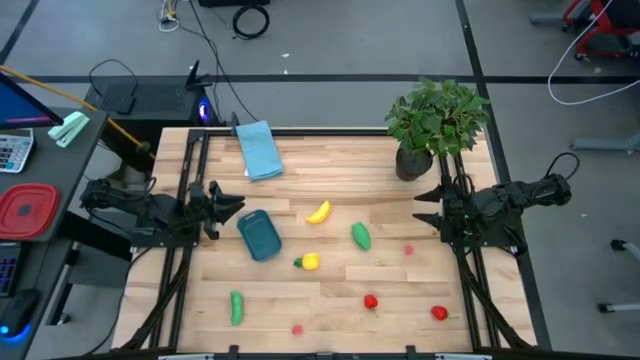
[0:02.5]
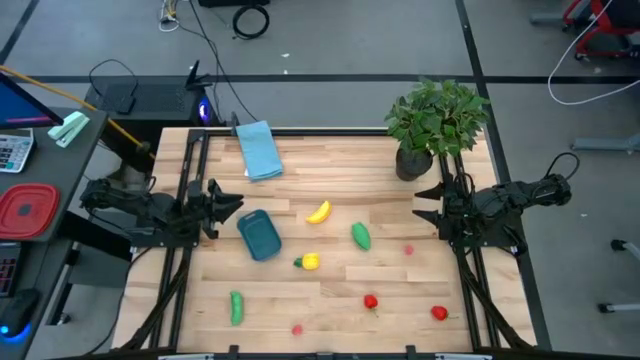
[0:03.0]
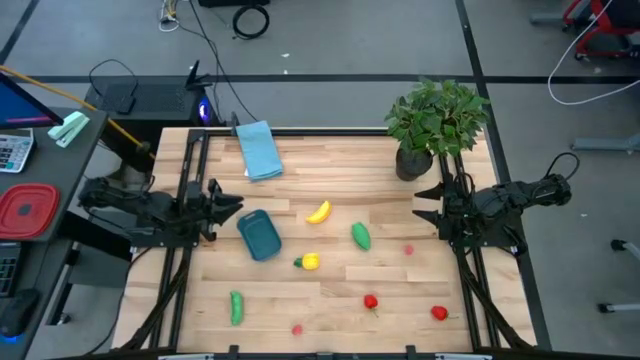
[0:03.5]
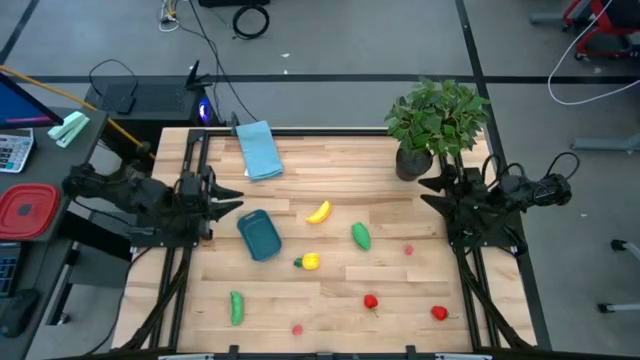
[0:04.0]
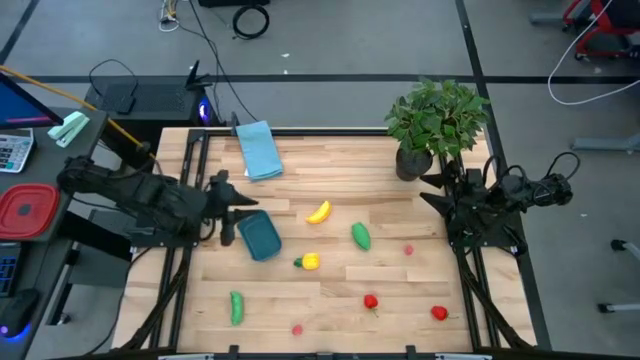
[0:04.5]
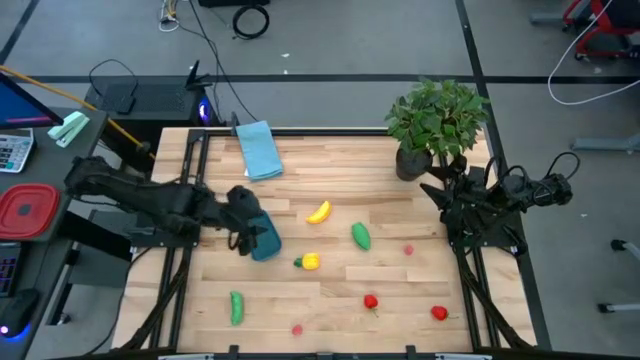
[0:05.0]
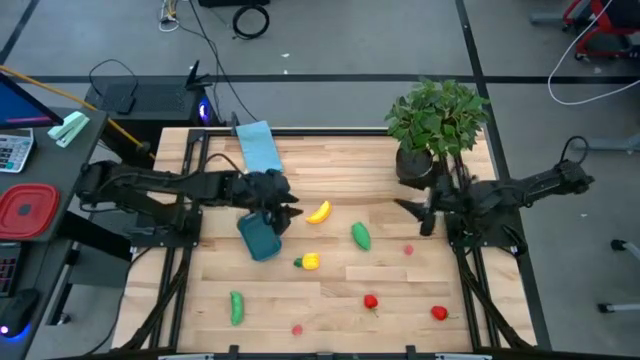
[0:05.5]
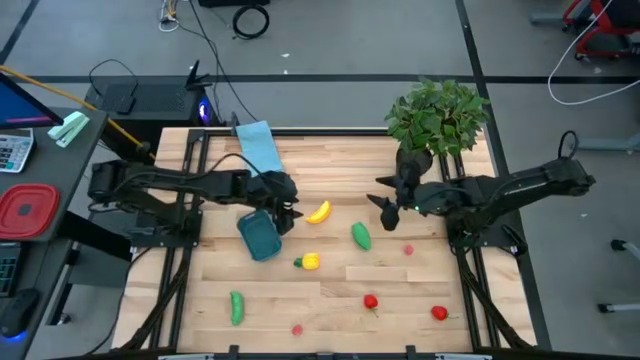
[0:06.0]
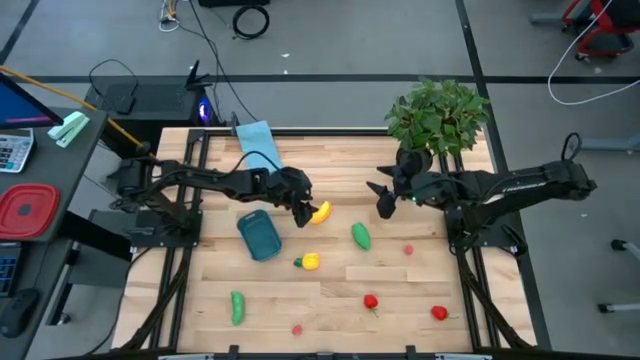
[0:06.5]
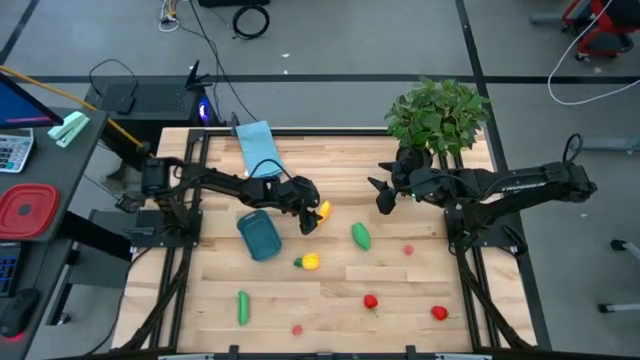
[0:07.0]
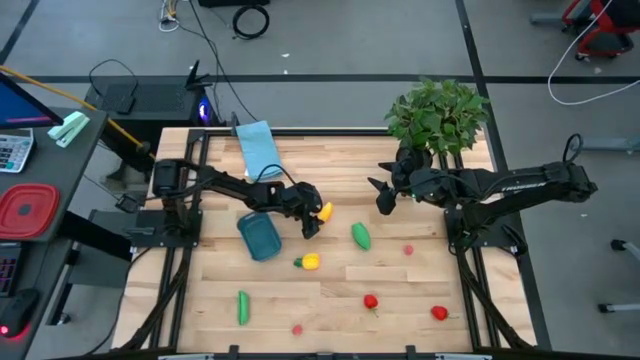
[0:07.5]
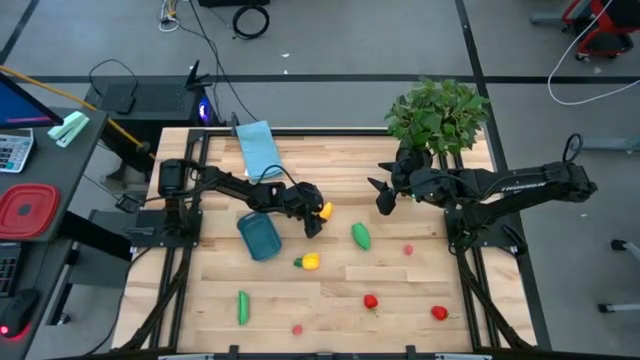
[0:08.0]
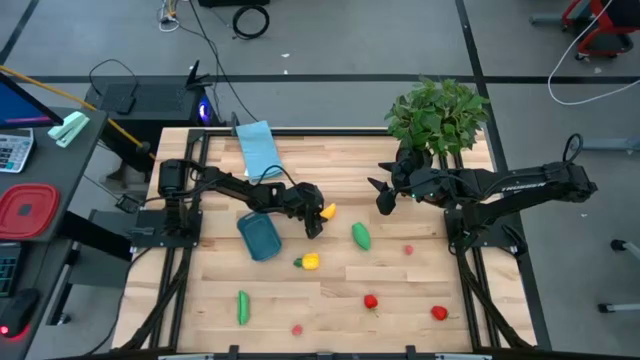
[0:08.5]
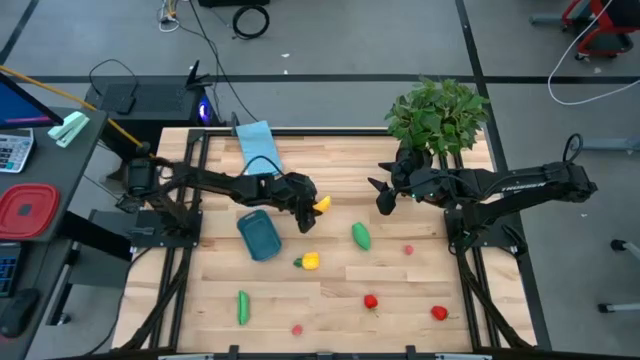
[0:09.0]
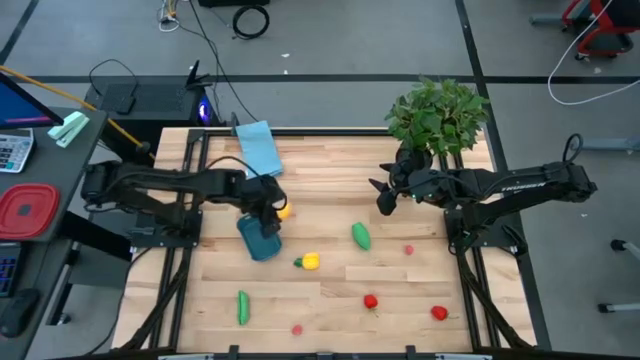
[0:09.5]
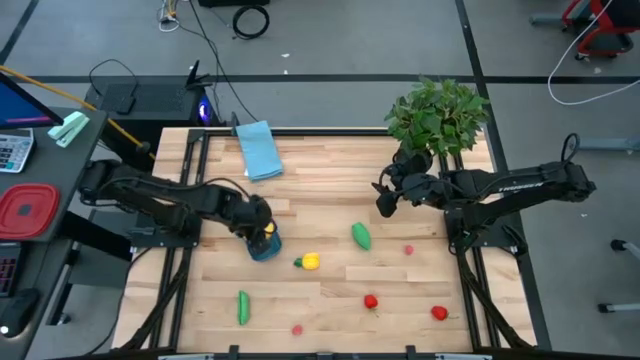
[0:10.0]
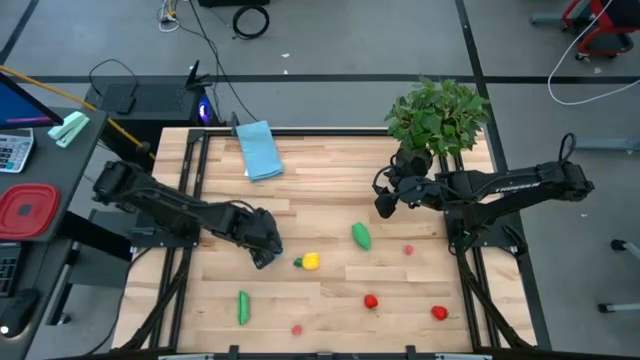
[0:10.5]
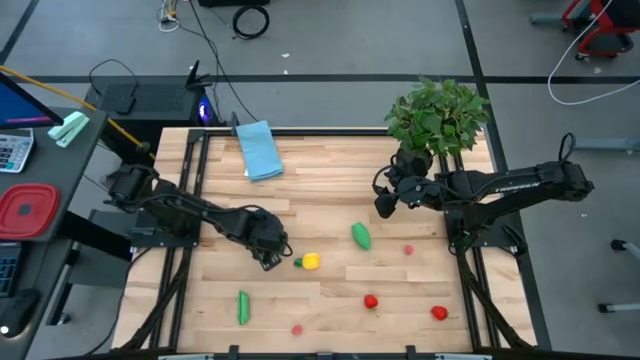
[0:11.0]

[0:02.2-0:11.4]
Task: Pick and placing Produce into tupperware
Put the banana into the blue bin

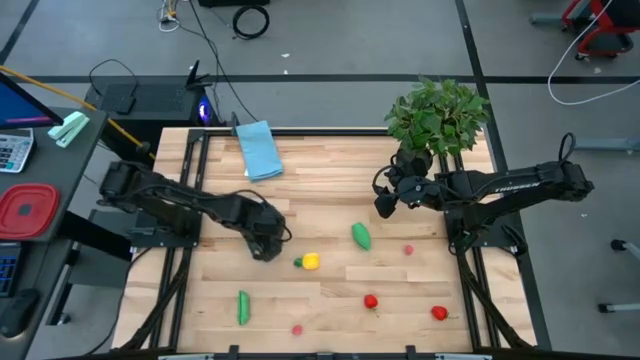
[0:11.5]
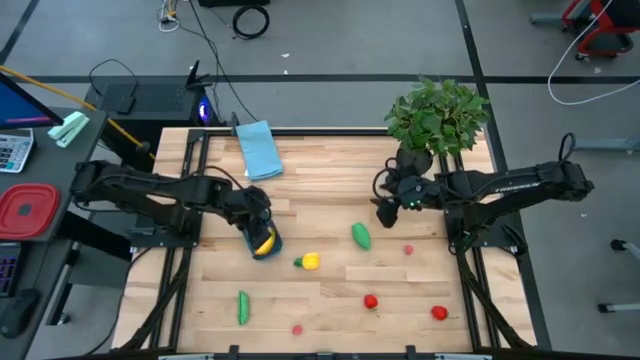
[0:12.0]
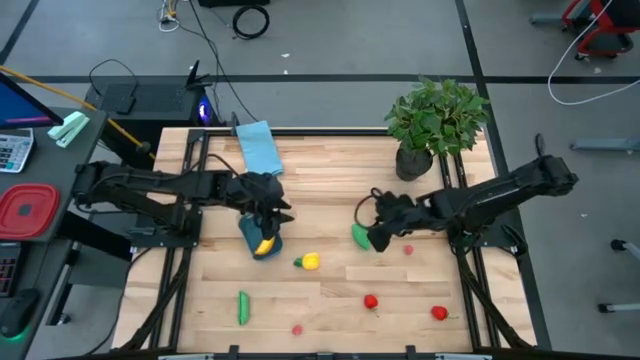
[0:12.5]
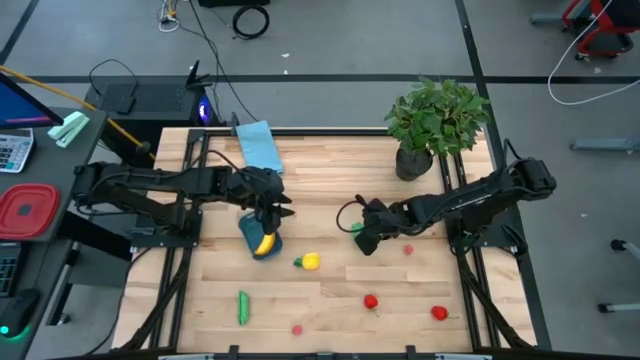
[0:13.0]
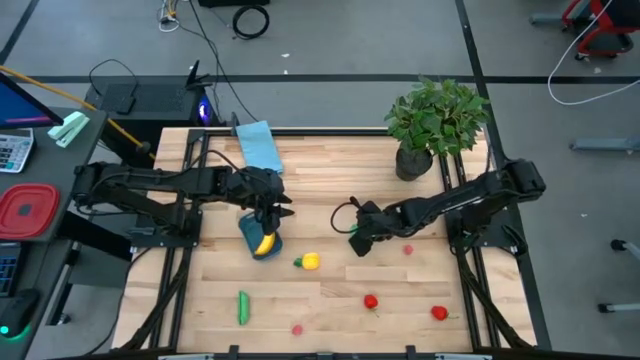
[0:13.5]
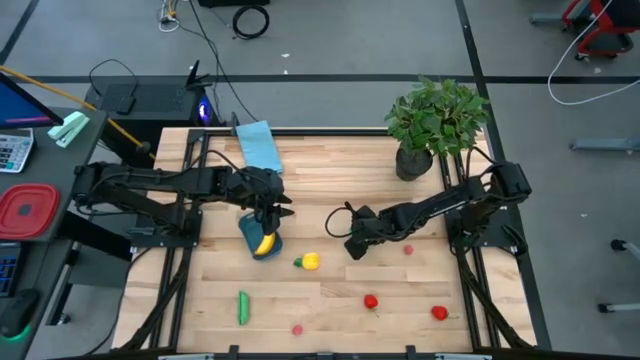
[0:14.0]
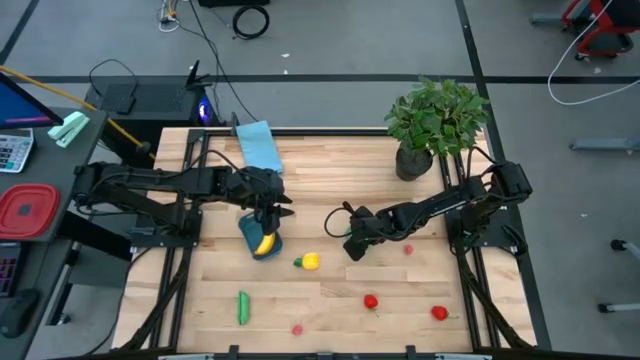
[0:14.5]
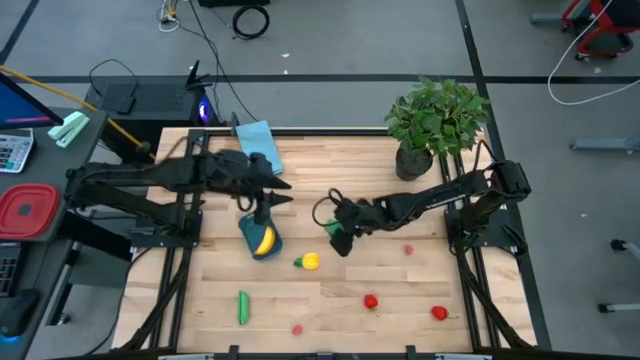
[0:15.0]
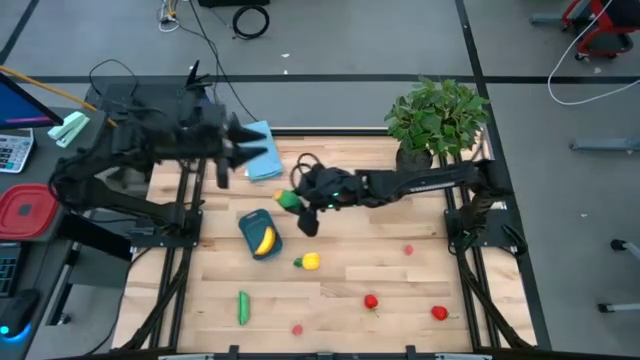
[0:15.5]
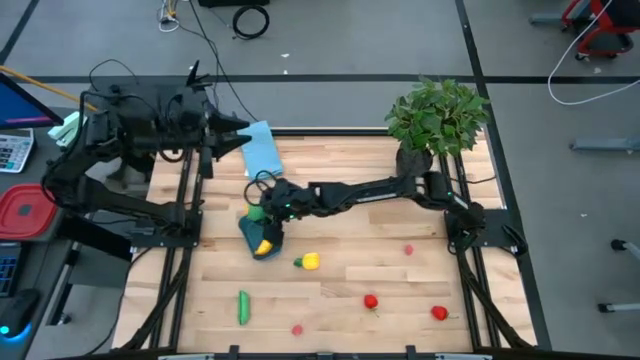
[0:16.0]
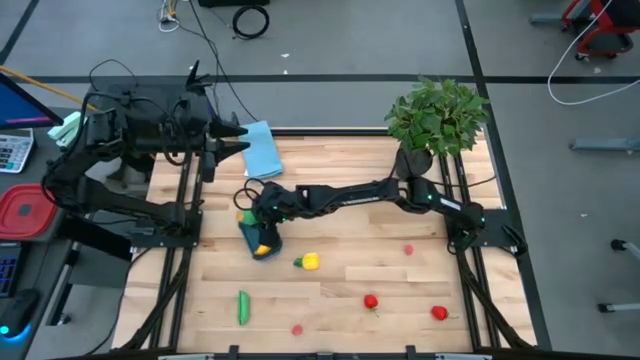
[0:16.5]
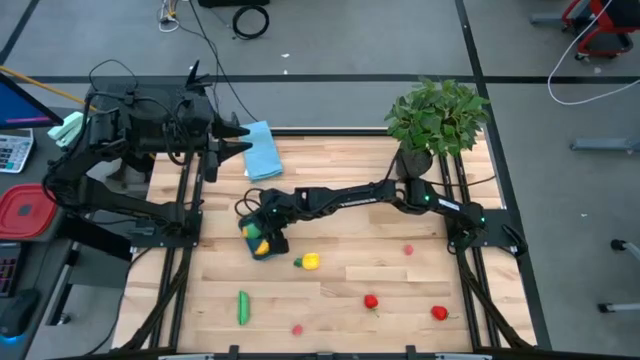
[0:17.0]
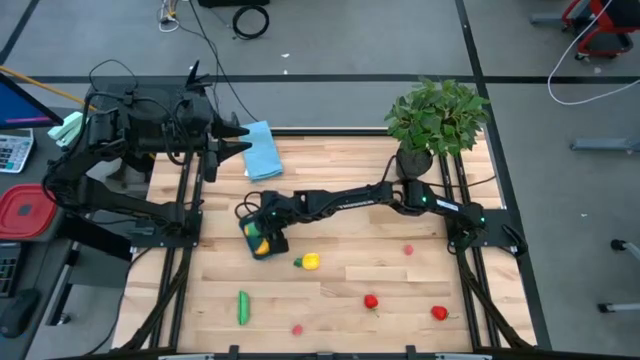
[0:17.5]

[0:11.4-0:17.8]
Put the corn into the blue bin

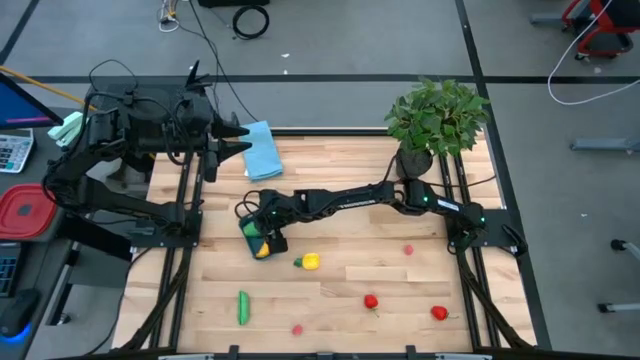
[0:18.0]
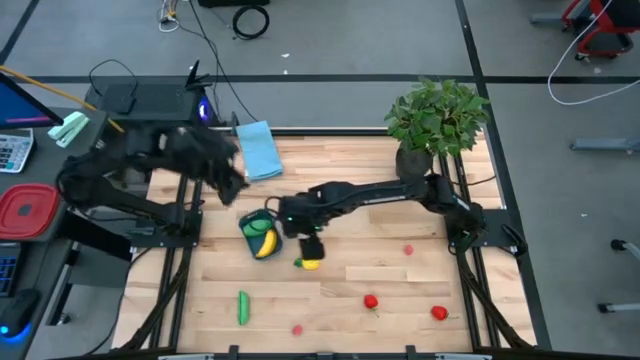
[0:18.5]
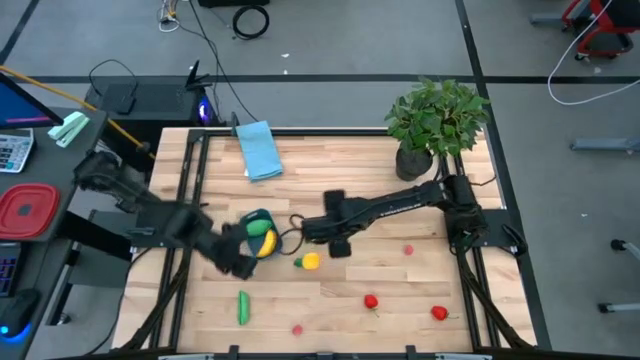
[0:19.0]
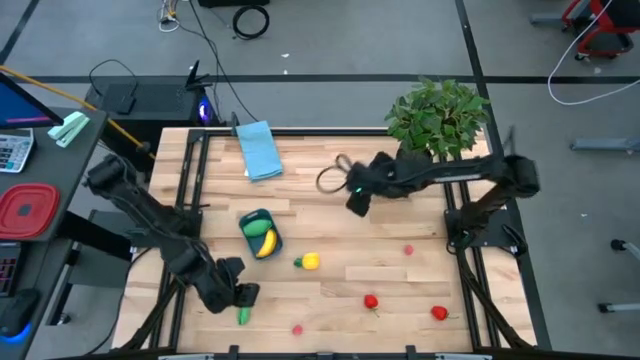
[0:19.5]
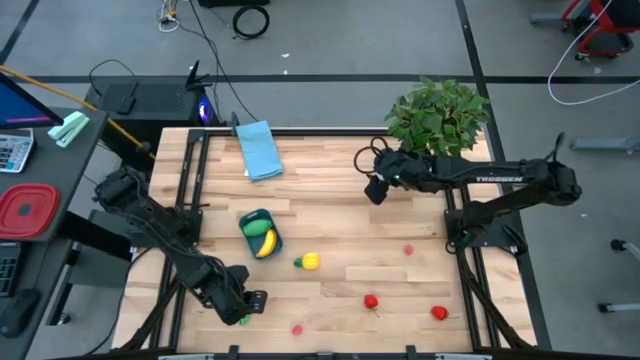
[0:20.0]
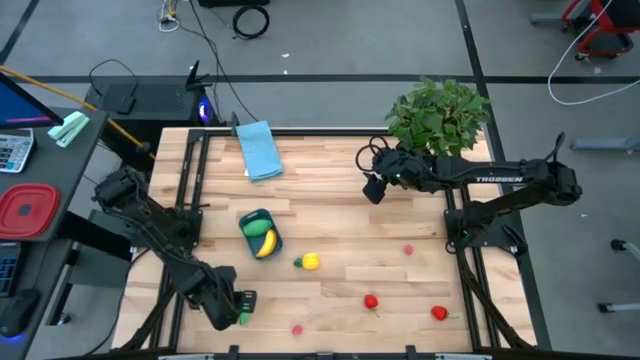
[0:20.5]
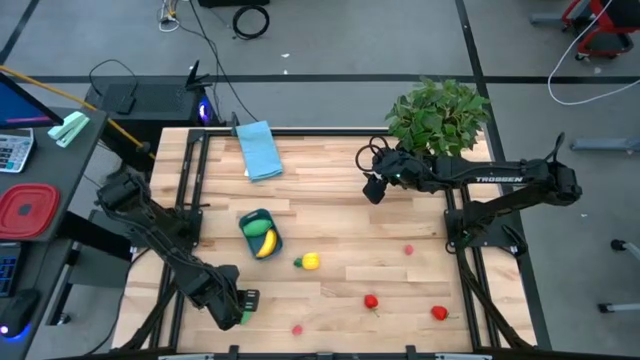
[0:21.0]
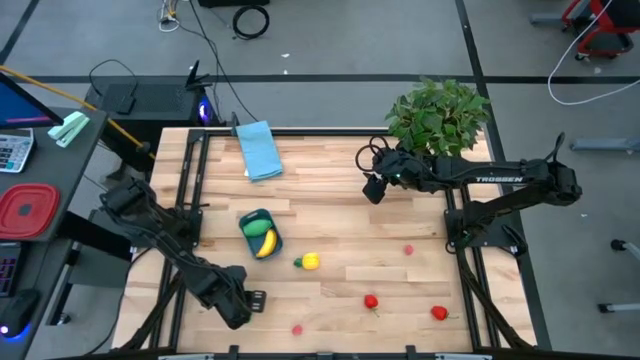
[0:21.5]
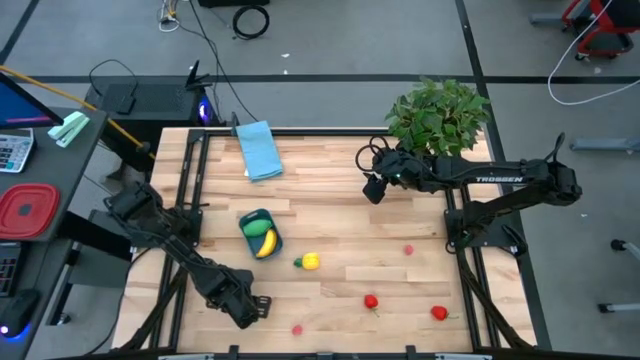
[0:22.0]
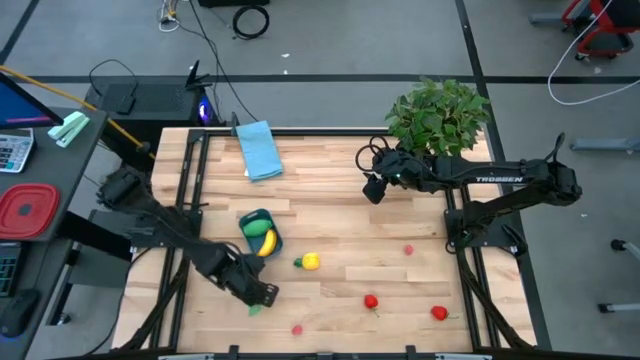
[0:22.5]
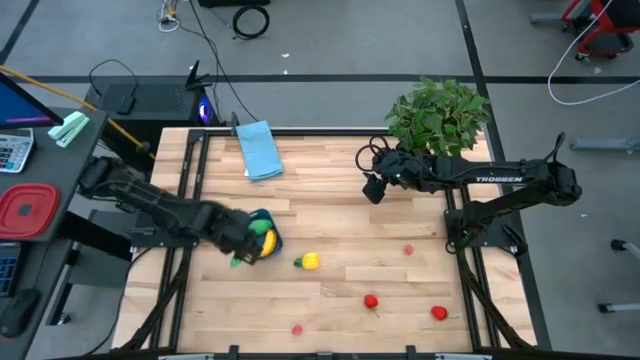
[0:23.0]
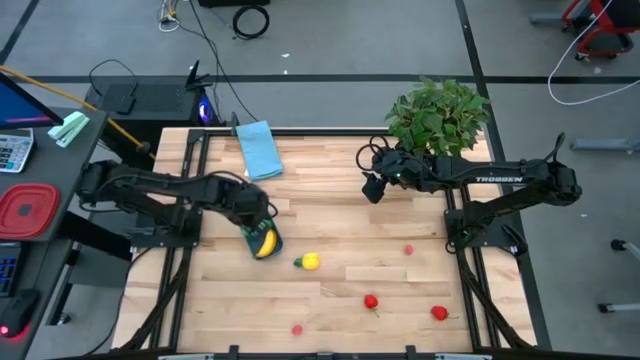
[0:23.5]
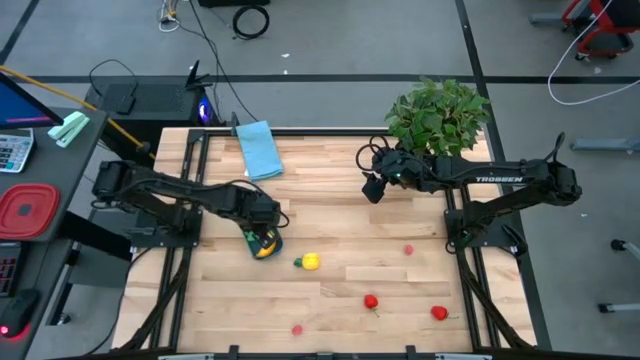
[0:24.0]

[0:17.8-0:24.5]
Put the peas into the blue bin
